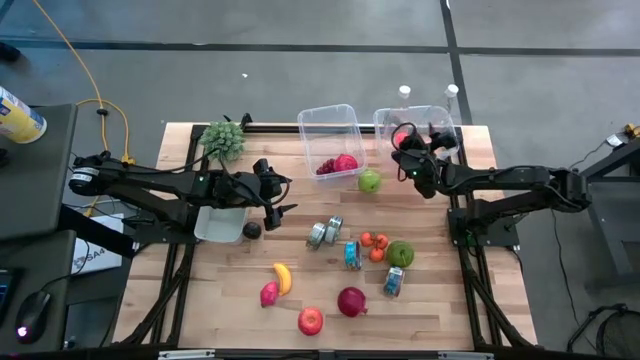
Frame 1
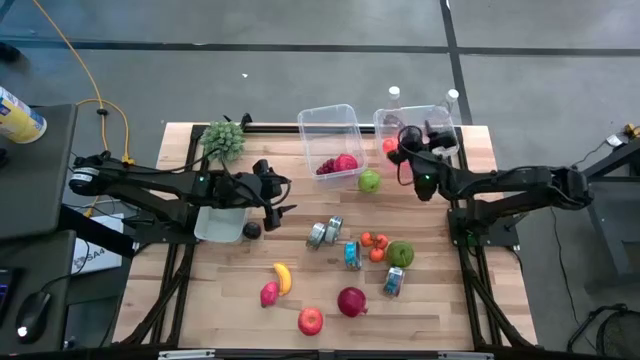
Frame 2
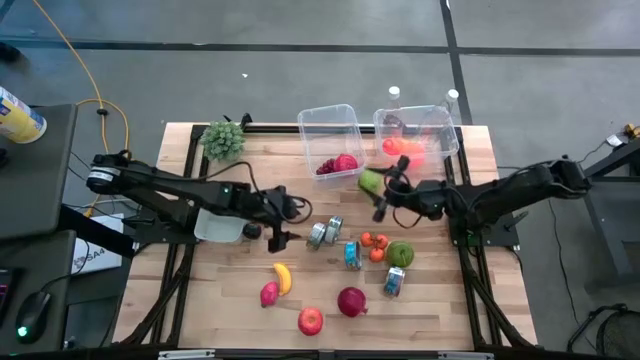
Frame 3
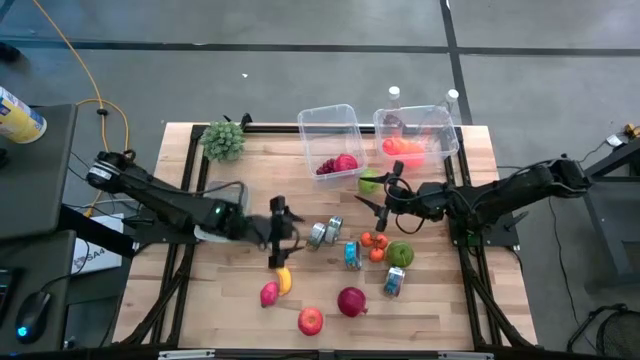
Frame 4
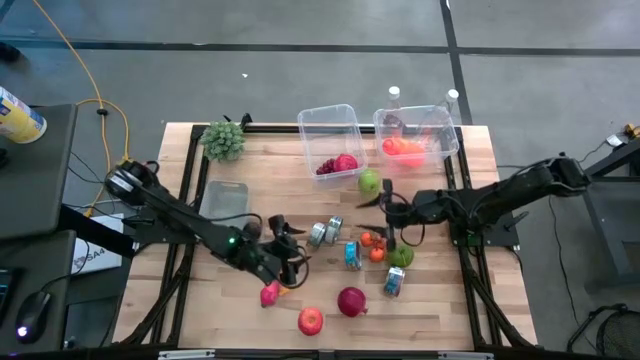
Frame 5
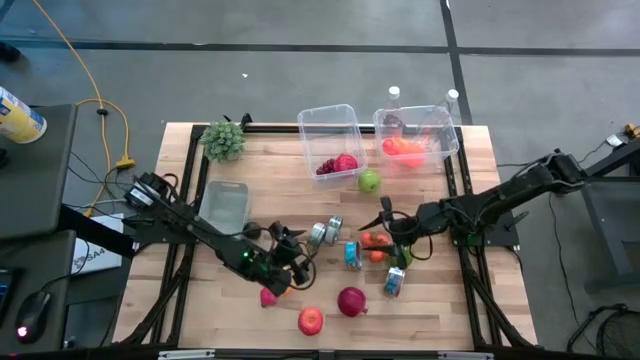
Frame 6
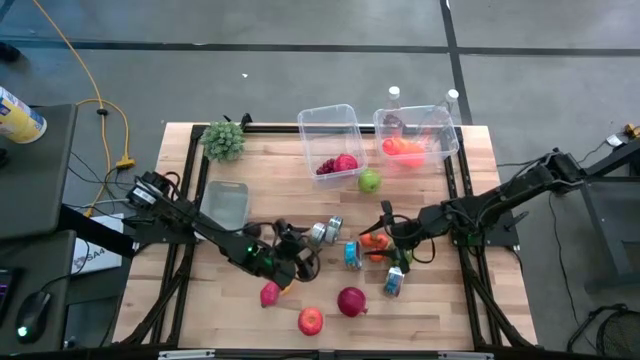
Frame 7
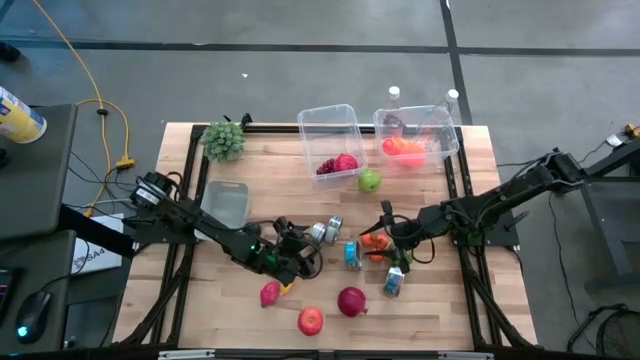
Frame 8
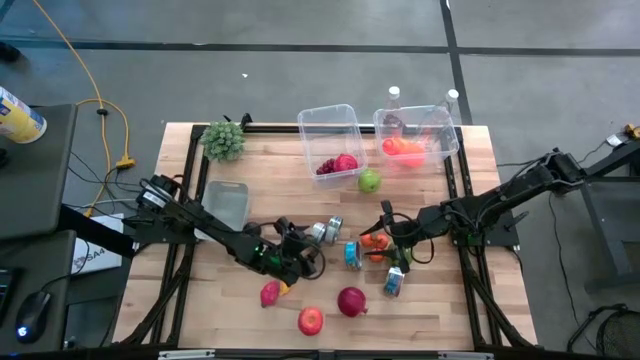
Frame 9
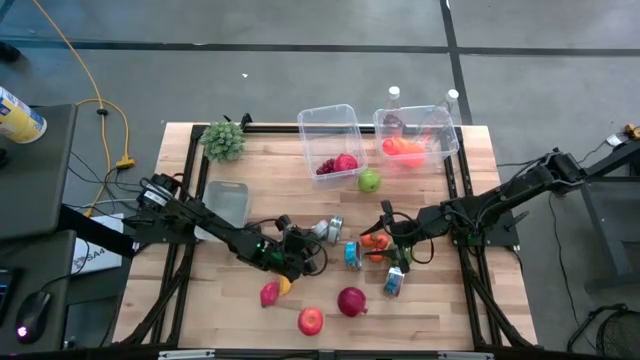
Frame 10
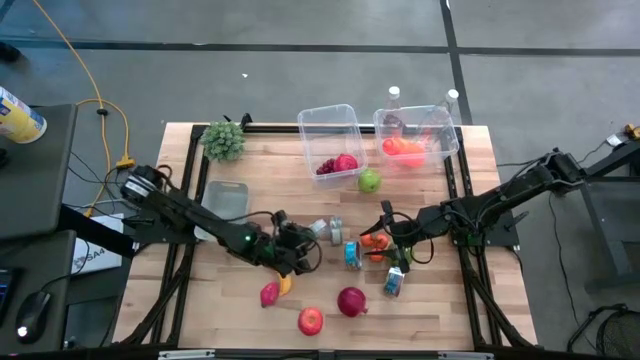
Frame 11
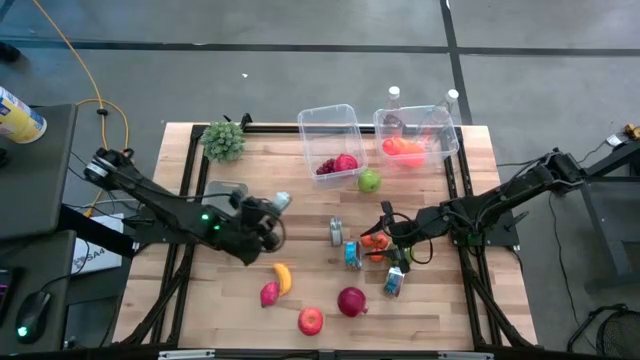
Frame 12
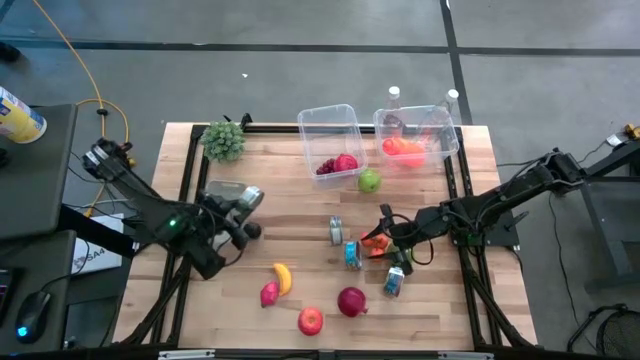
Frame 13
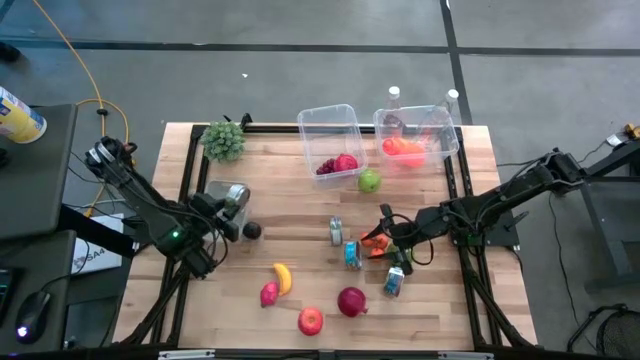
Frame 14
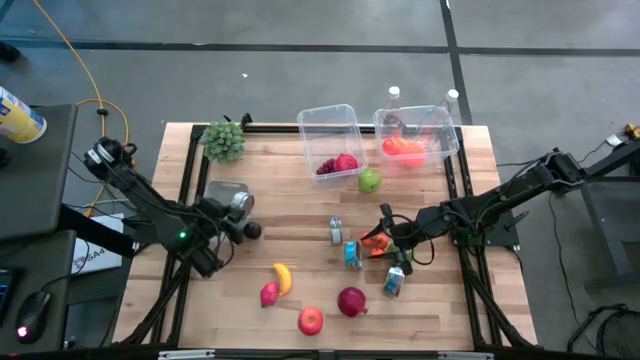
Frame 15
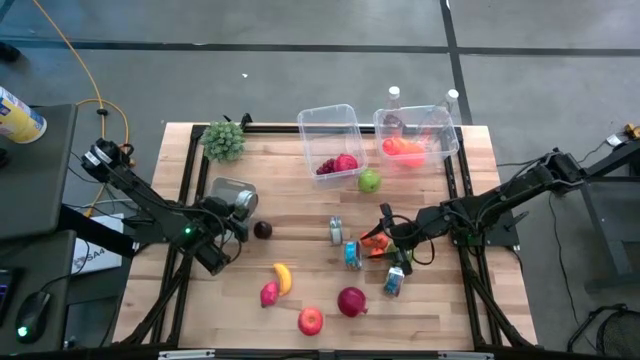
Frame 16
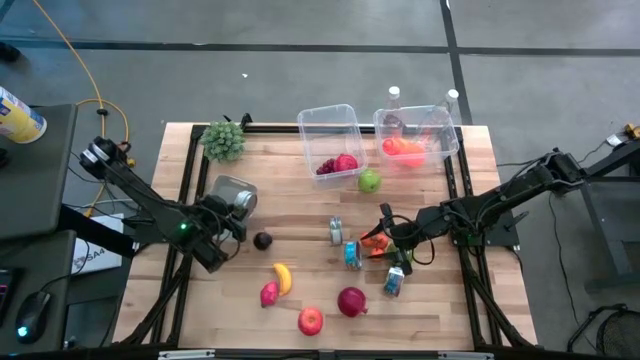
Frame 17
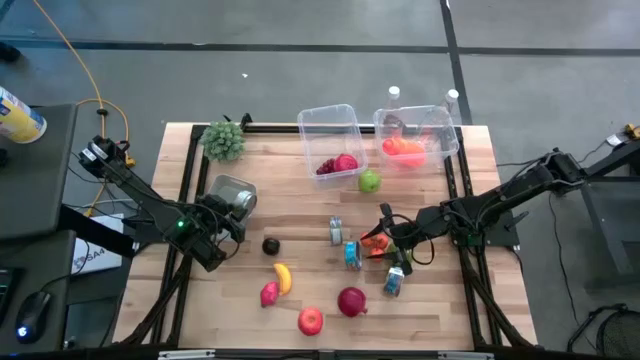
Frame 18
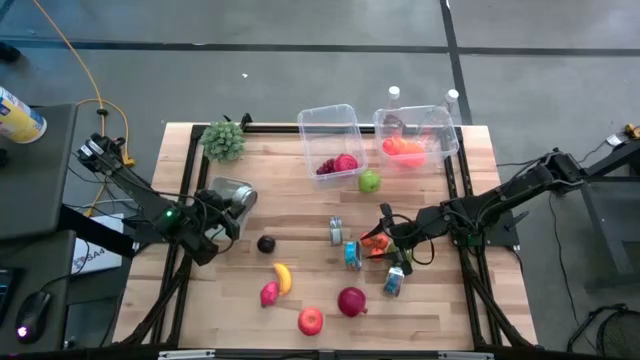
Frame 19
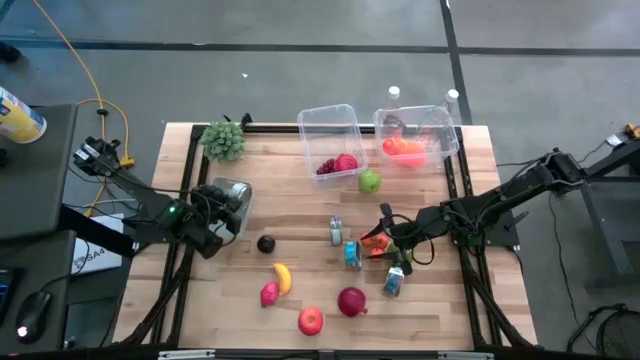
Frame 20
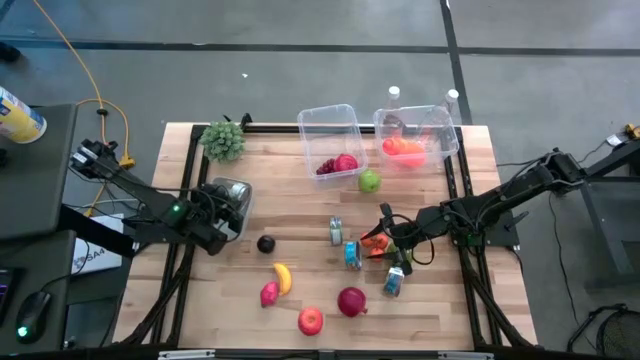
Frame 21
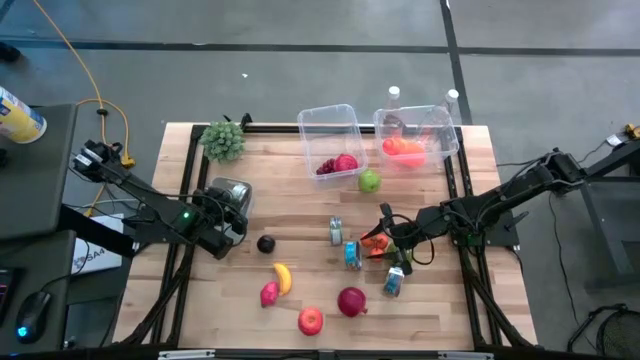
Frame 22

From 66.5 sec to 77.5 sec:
Task: Pick & Place Food Item
Put the left green tuna can into the gray bin

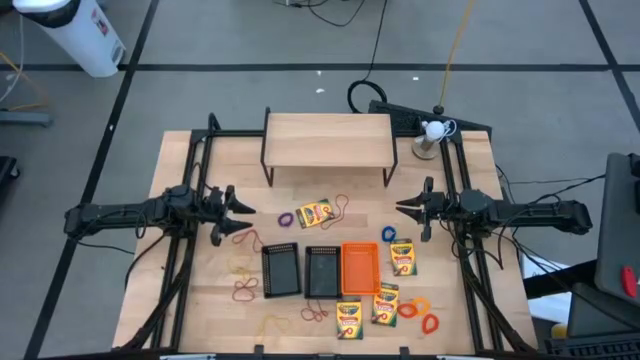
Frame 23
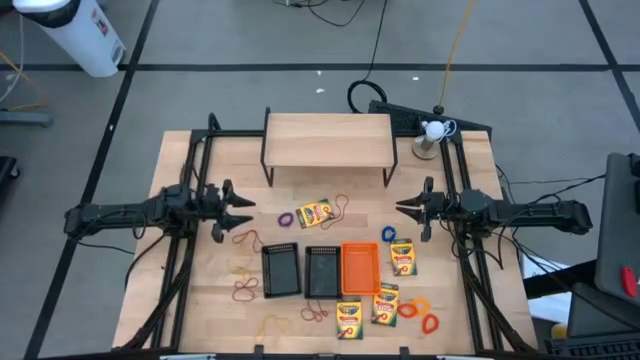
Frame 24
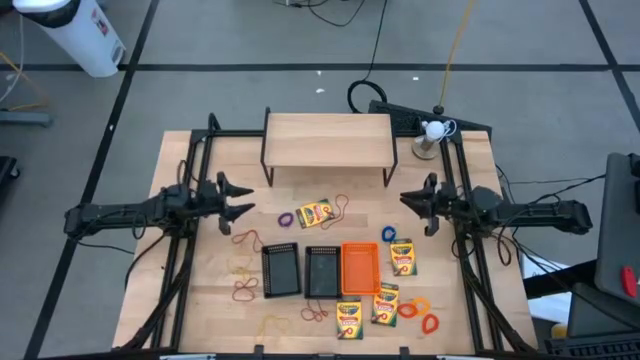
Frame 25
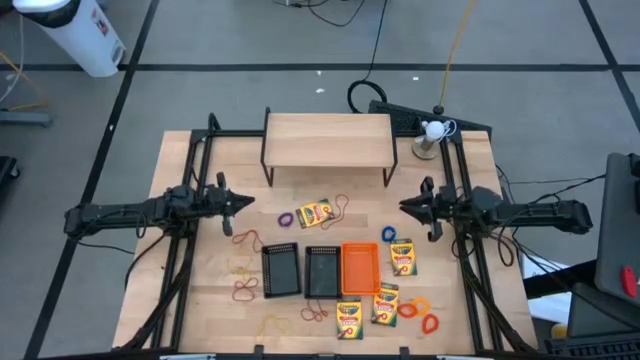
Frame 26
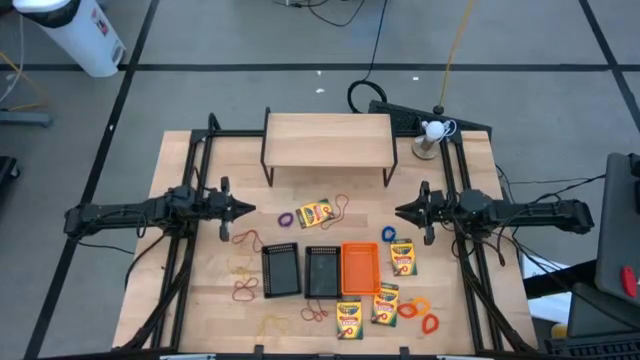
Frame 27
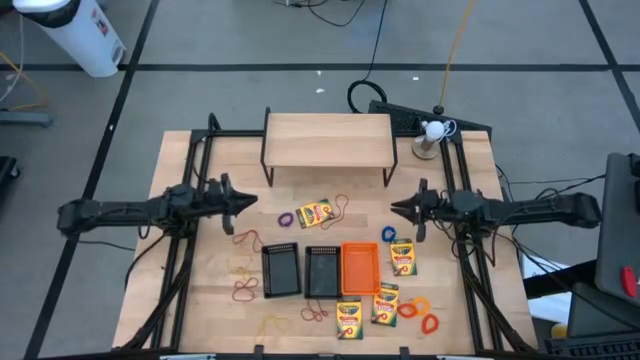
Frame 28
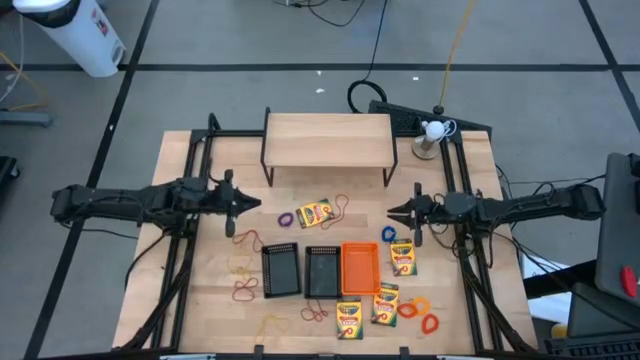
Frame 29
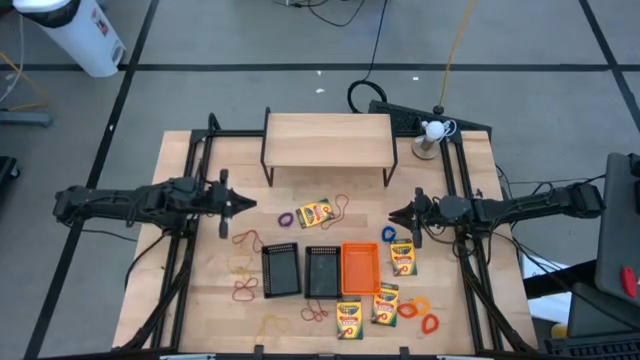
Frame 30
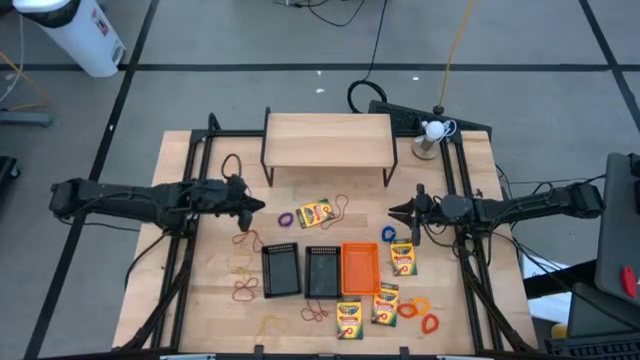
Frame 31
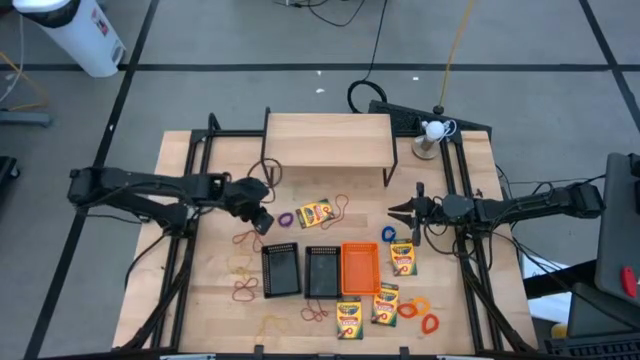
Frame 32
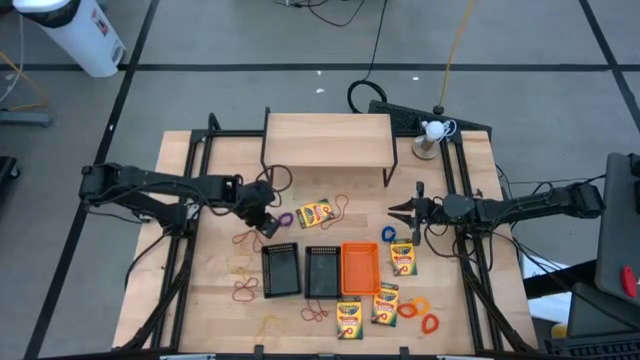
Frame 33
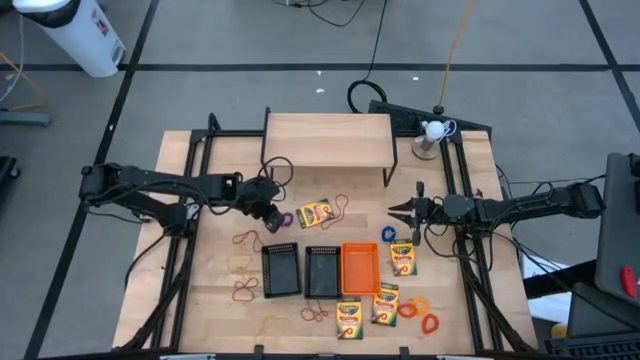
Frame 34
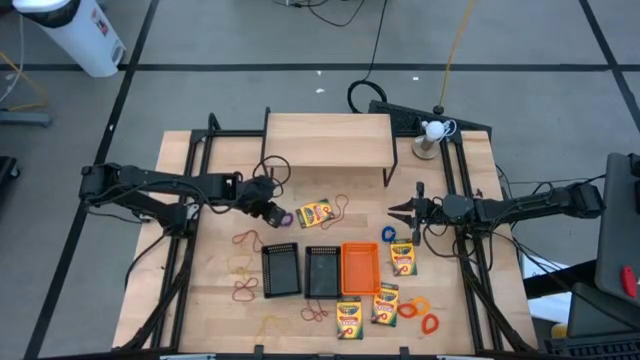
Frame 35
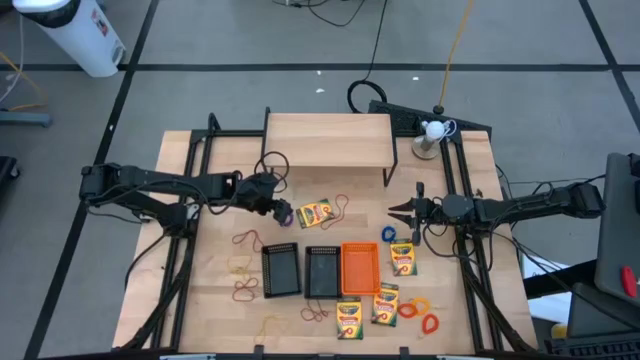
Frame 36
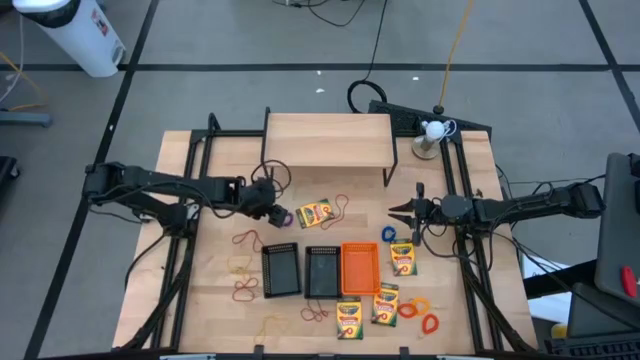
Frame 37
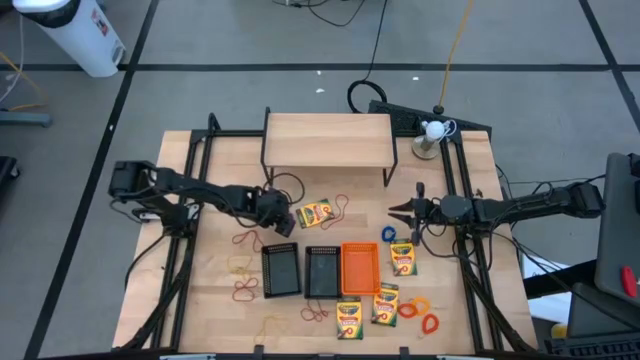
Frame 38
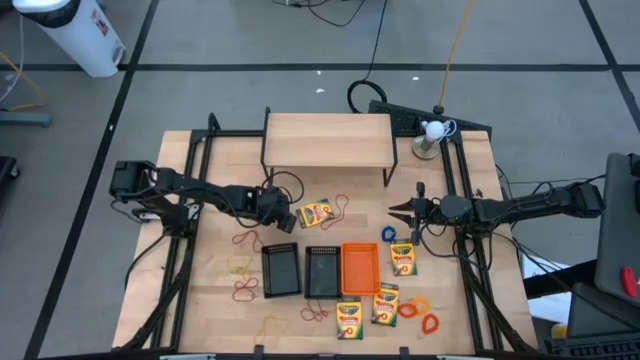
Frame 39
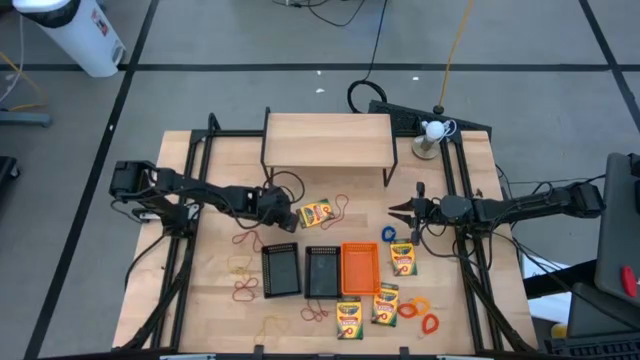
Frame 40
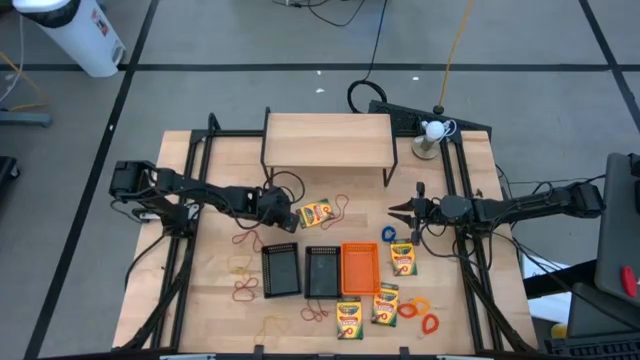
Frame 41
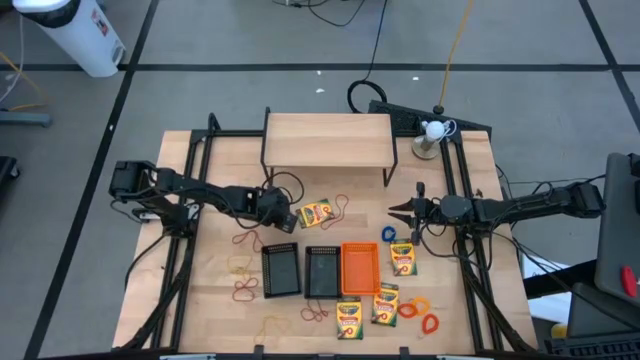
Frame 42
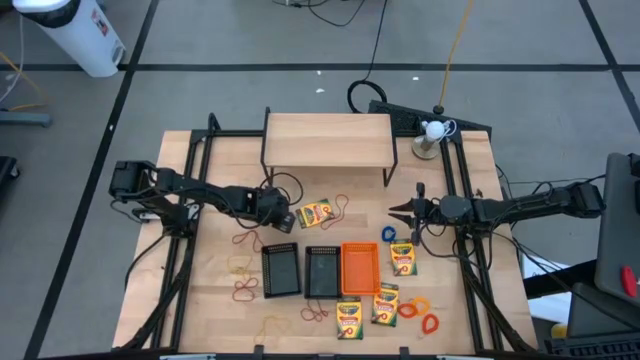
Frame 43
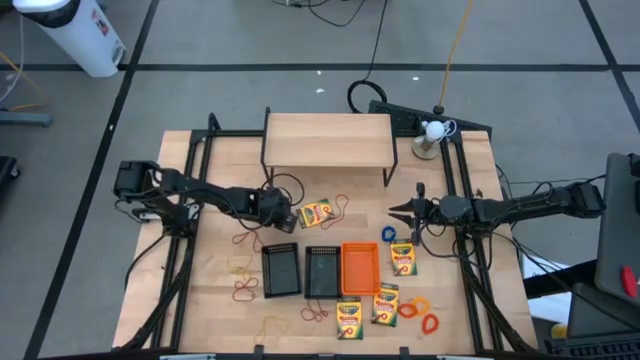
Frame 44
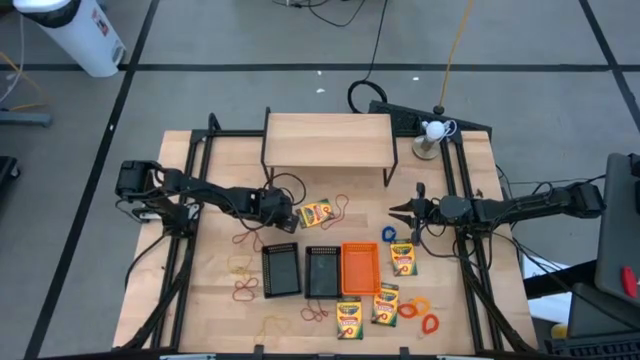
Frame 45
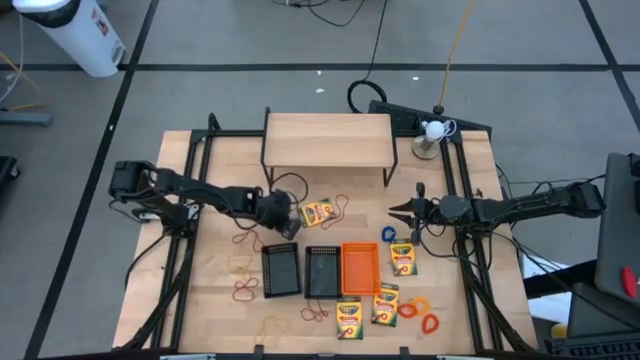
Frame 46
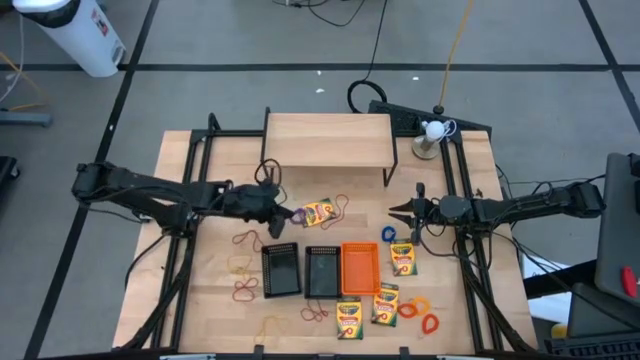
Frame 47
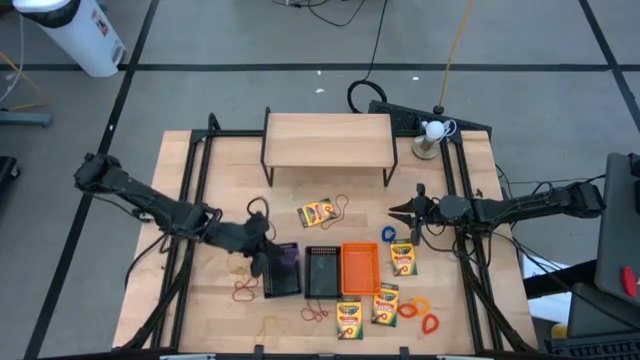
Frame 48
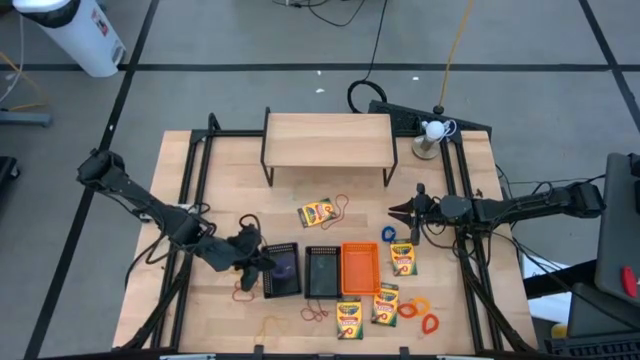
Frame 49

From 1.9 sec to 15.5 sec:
Task: Pick & Place Office Desk Supplies
Put the violet spring keychain into the left black bin
